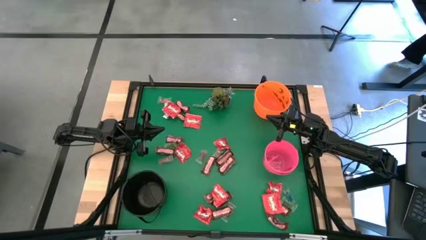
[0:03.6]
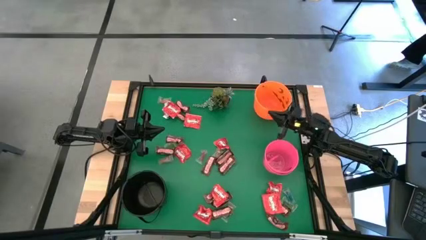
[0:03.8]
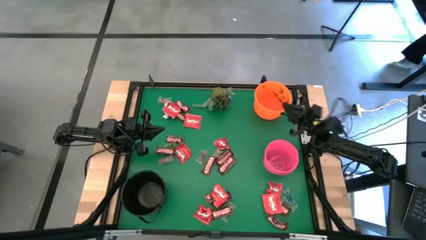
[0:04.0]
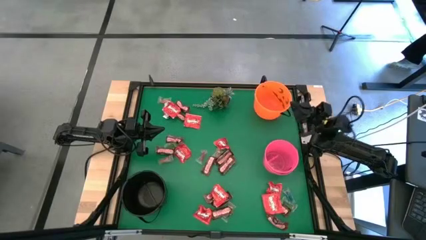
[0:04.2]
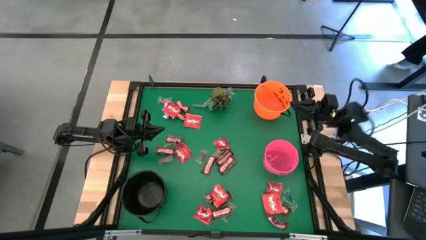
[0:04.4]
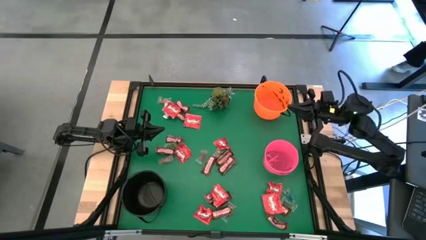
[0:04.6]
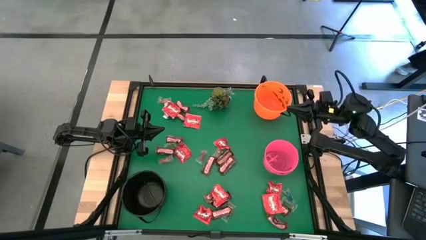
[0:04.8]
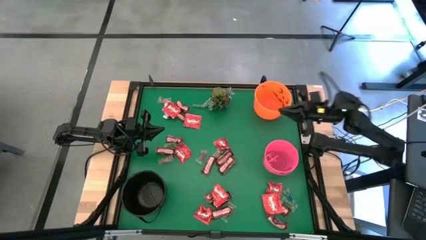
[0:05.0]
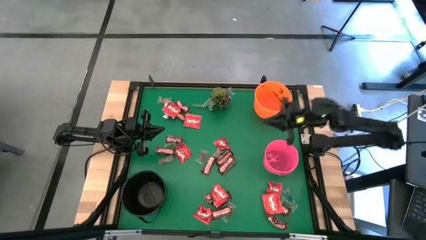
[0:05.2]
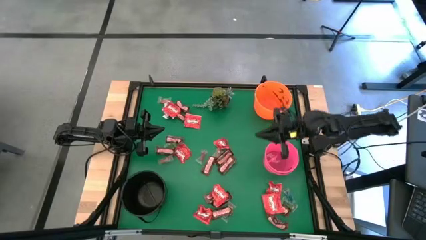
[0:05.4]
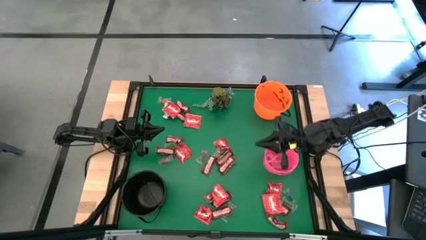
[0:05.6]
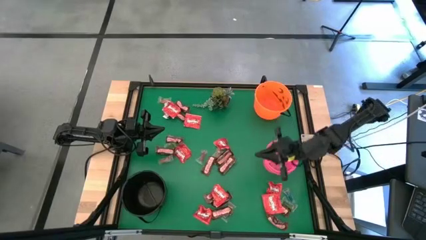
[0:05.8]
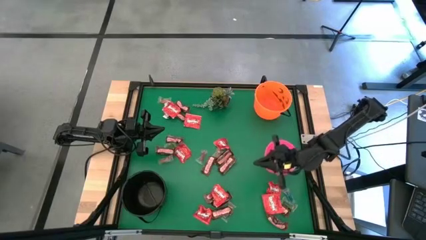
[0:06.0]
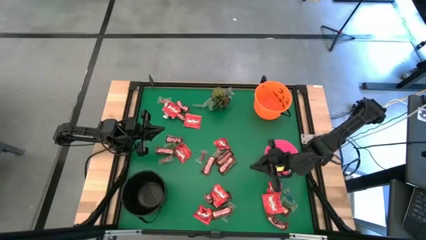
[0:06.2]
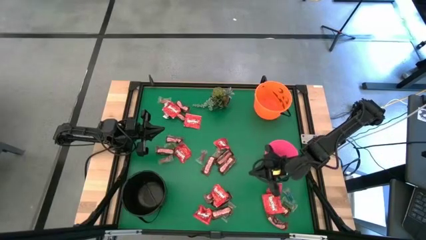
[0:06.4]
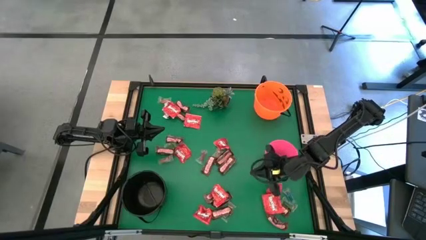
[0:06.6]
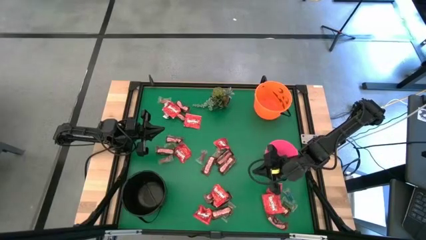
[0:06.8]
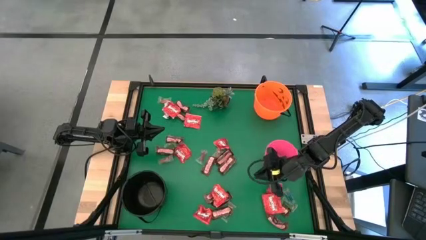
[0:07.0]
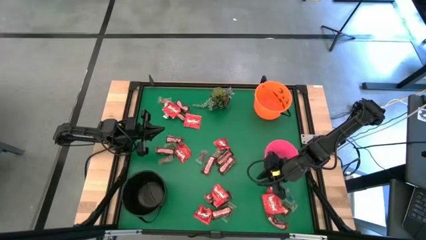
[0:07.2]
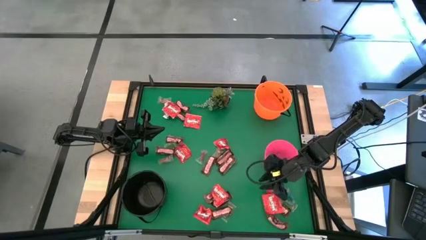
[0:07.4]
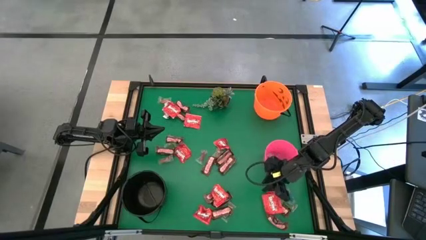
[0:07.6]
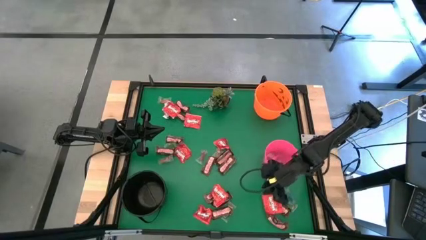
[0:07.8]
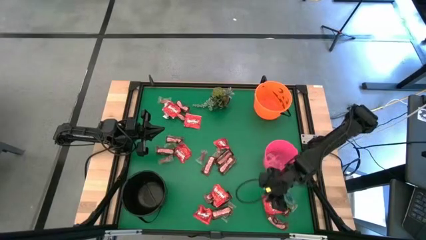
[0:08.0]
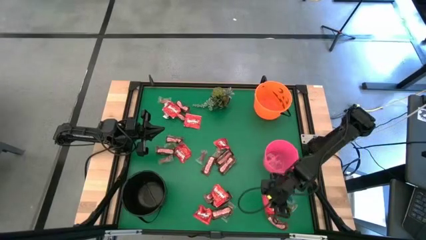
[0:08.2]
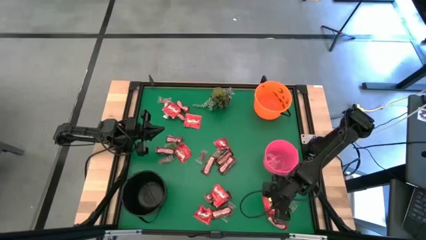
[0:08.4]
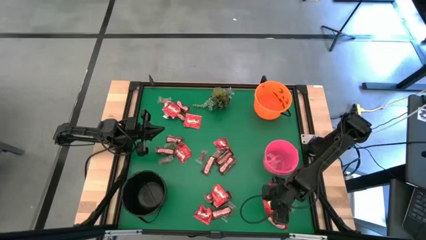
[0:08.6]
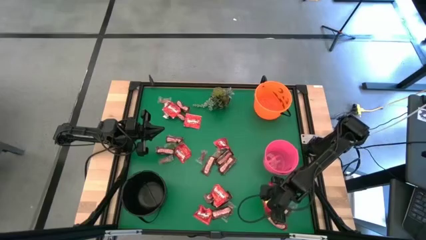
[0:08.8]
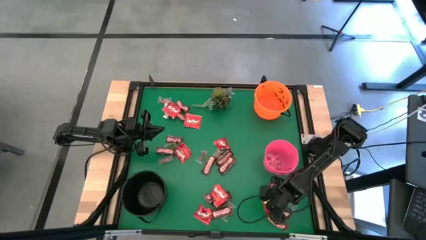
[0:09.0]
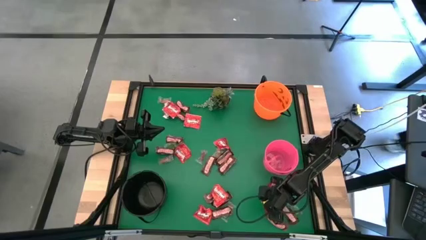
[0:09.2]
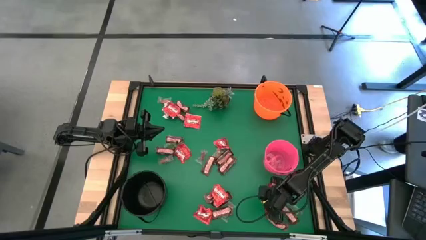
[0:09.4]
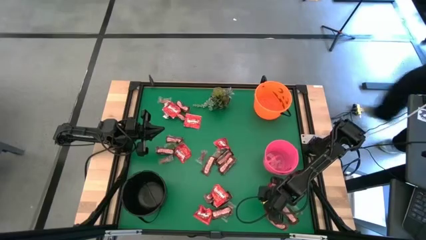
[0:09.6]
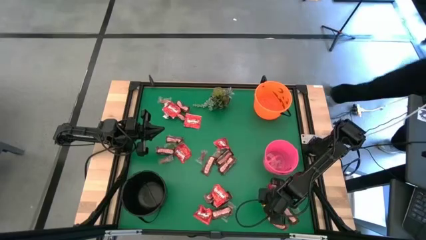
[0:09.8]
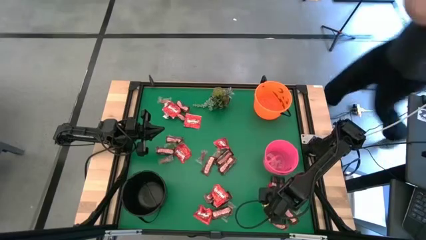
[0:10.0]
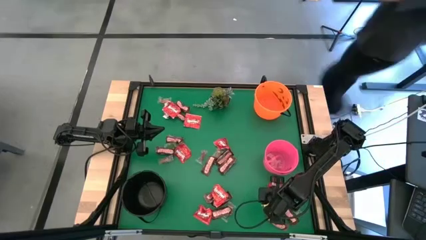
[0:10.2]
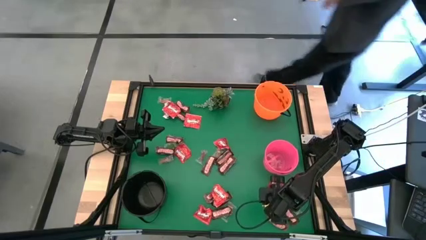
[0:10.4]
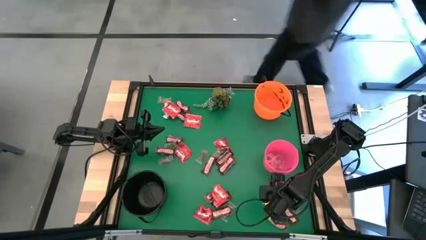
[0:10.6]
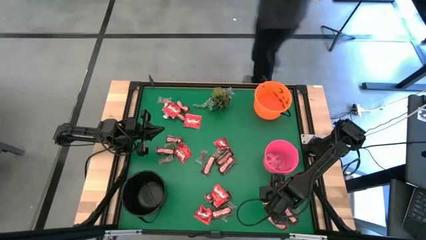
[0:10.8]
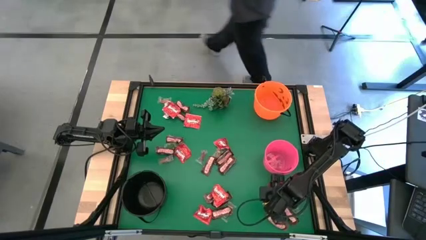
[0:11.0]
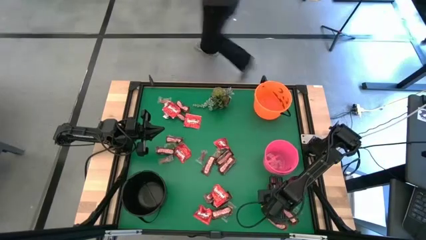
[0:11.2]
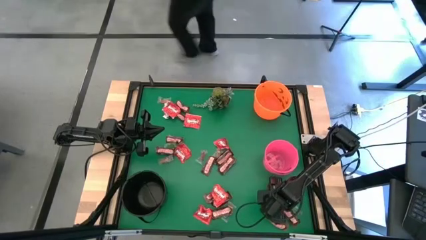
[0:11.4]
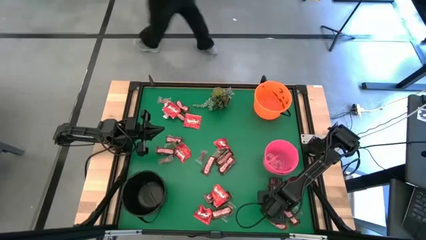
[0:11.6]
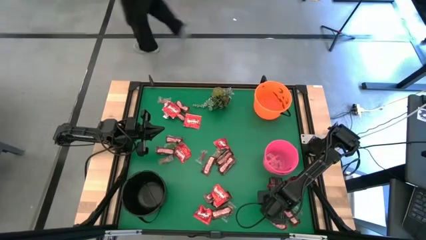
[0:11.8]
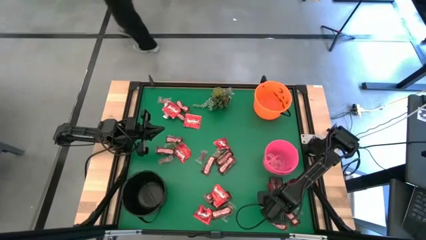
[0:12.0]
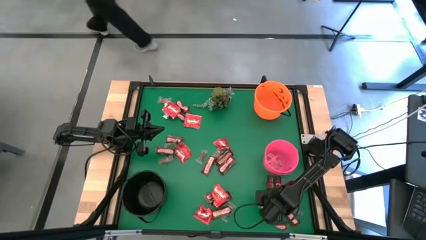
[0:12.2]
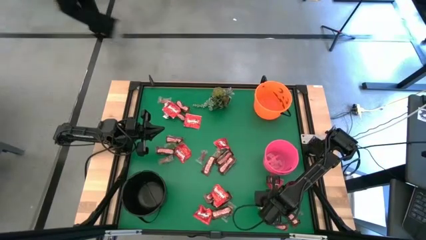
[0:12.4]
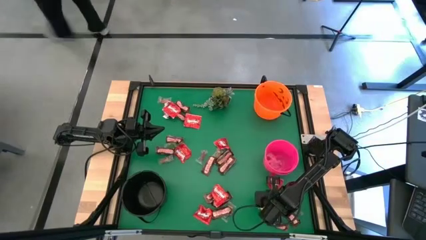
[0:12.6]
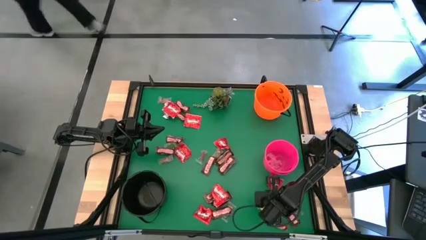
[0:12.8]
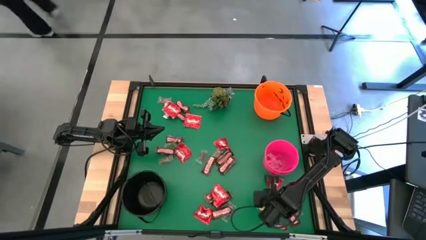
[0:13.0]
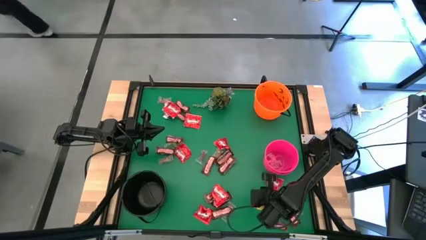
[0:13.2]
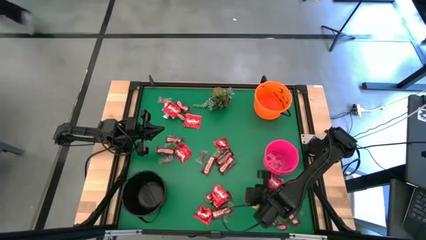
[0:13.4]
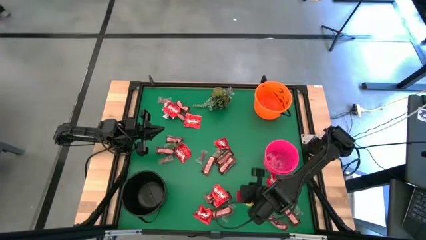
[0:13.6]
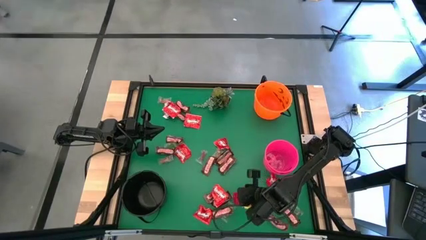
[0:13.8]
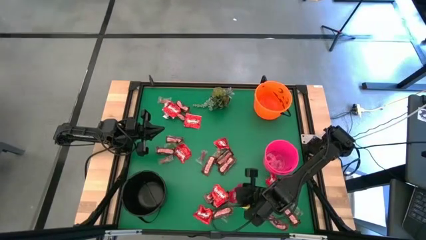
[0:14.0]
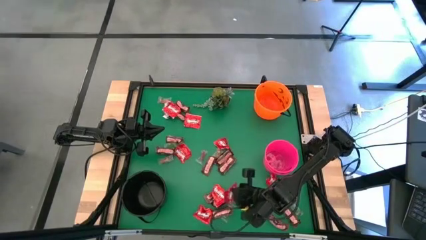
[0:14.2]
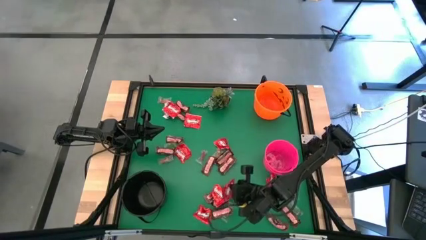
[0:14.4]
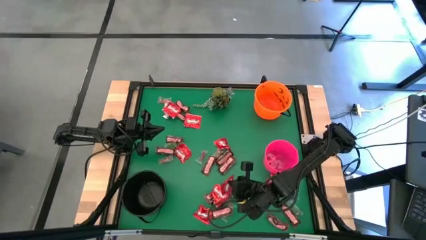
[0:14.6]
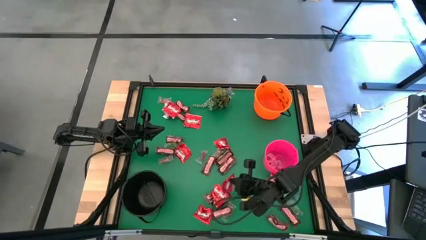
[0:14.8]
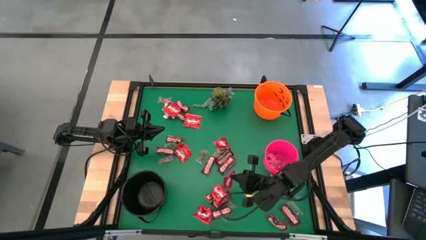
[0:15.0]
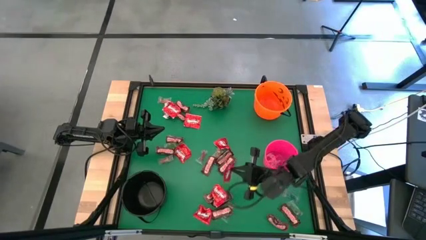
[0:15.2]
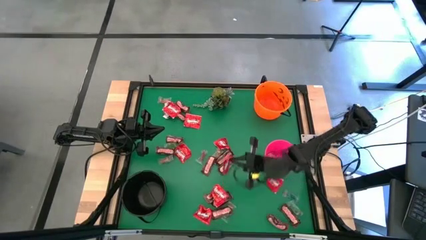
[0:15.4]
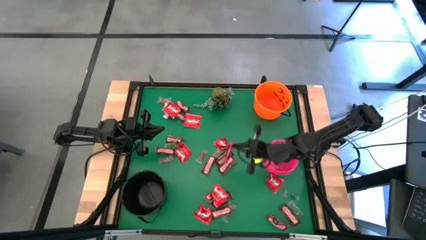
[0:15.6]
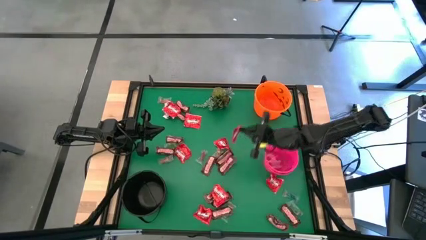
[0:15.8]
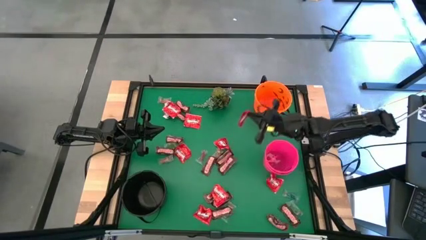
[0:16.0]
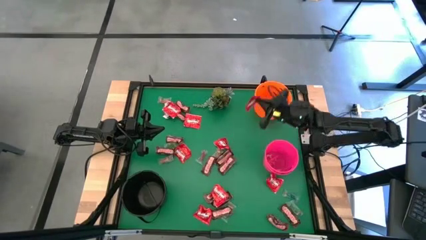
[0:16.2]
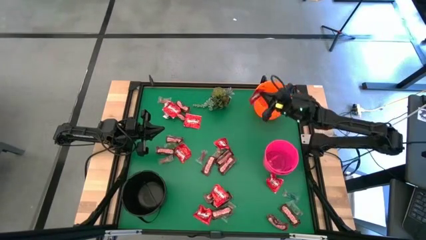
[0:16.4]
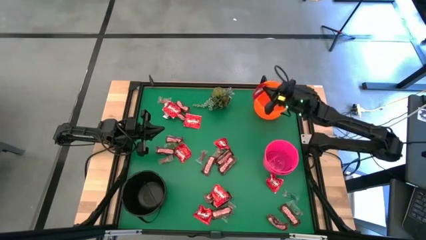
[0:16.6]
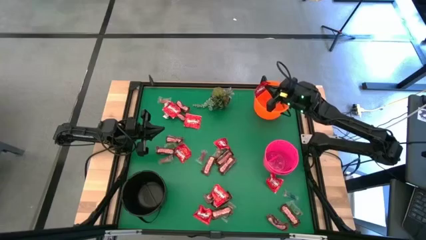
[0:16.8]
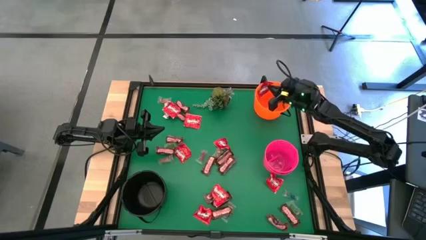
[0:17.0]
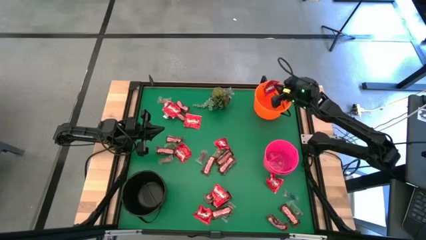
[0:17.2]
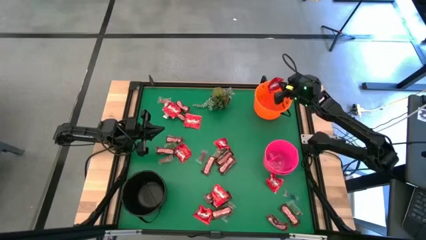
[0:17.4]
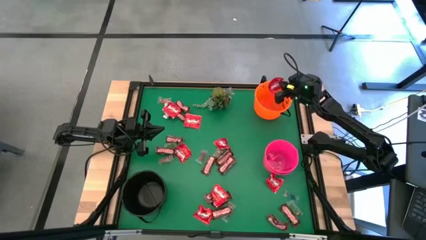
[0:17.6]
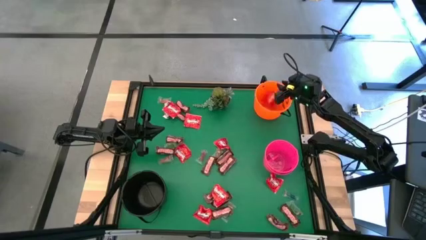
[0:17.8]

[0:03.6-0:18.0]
Task: Sort candy
Put the red candy into the orange bucket

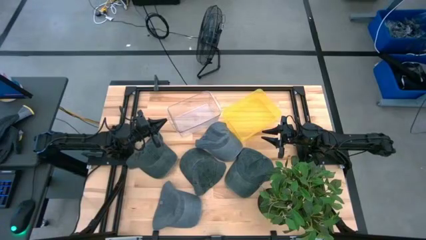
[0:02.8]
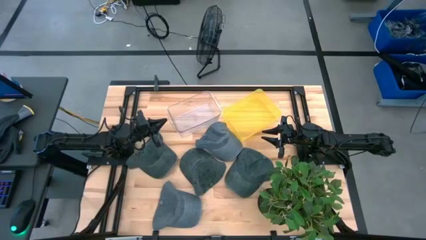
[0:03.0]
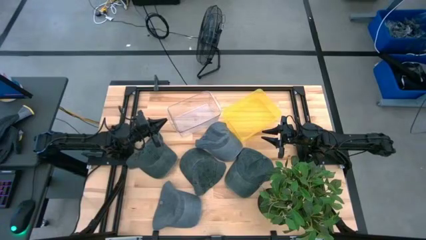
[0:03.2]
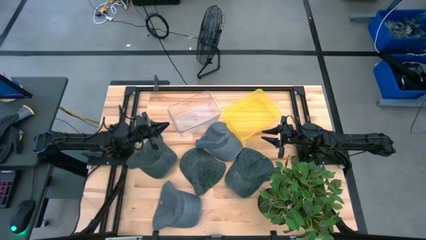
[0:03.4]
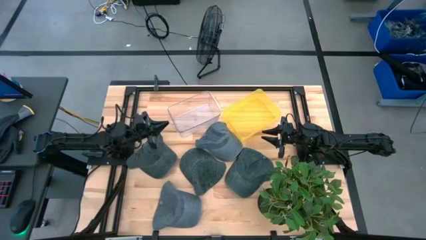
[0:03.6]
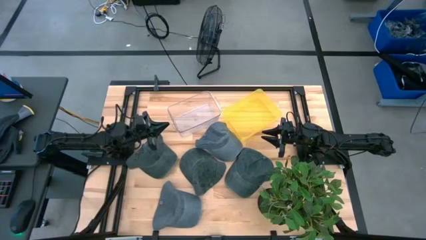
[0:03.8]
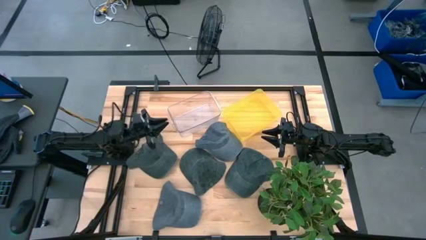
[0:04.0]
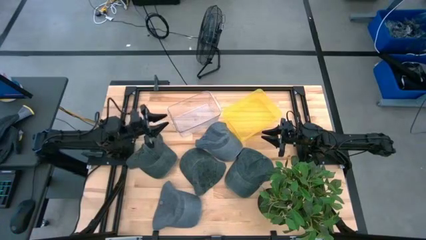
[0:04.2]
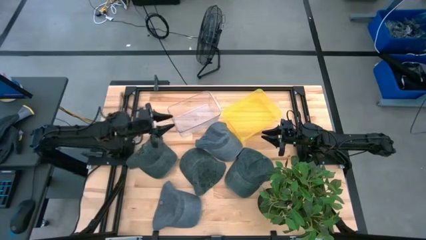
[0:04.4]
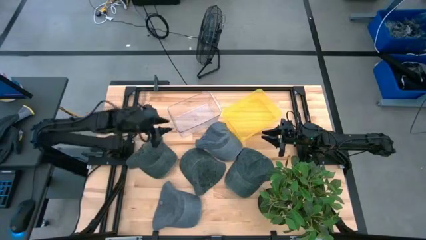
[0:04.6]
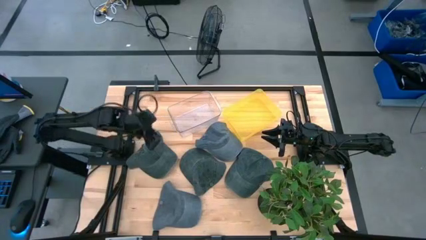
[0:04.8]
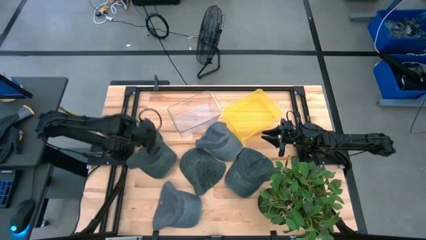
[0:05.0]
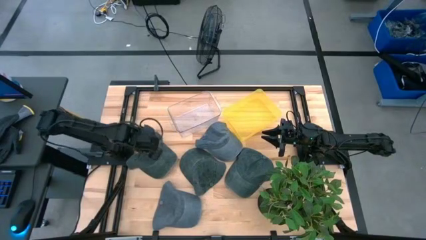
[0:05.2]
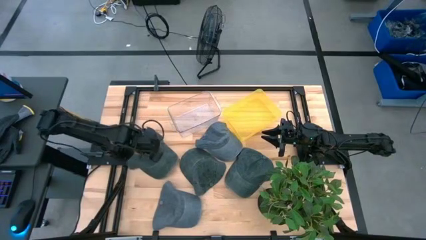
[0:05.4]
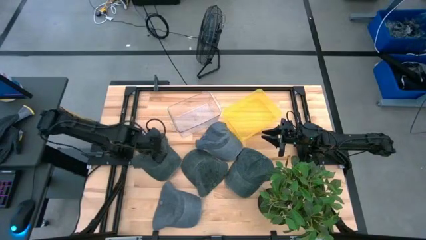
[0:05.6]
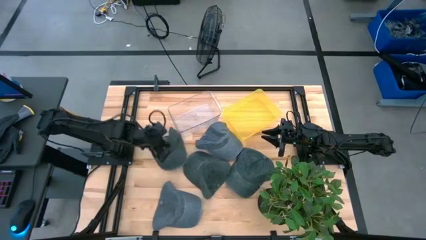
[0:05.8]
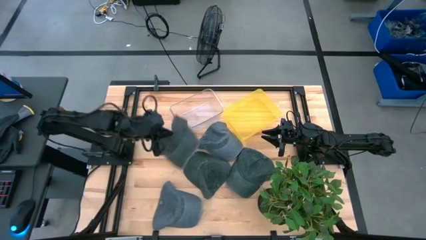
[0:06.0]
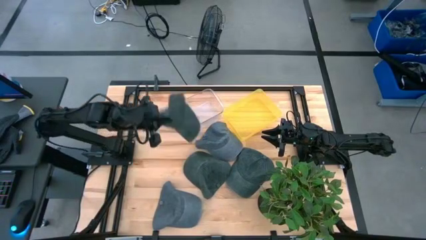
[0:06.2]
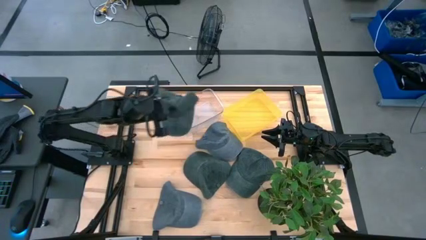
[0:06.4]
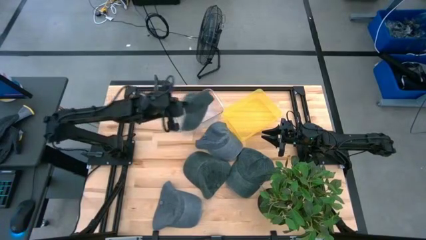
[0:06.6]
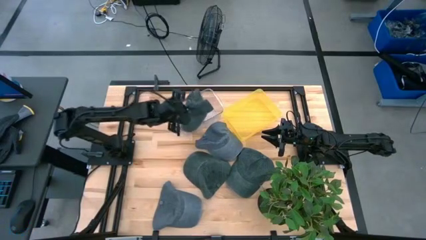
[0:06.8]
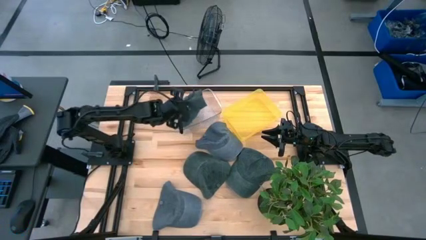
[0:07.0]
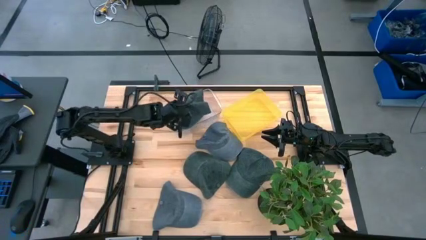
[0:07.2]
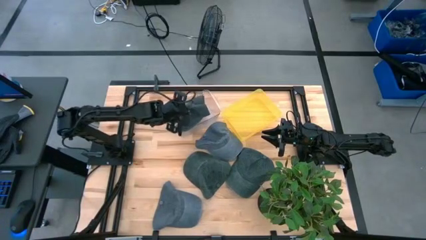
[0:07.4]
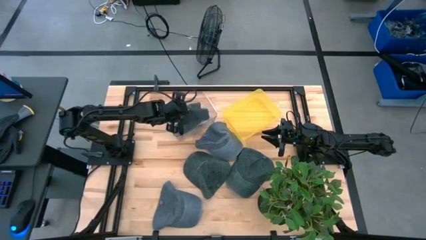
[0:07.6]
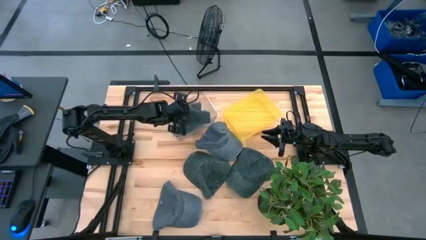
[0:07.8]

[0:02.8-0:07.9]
Task: Pick & Place hat
Put the left black cap into the transparent bin
